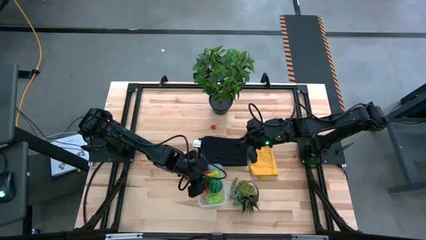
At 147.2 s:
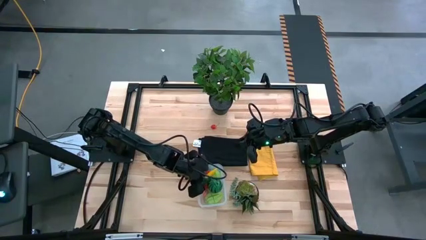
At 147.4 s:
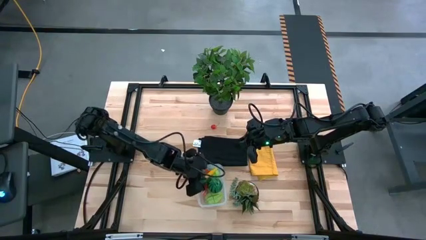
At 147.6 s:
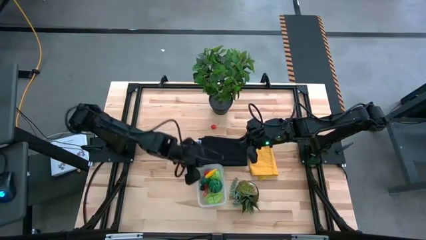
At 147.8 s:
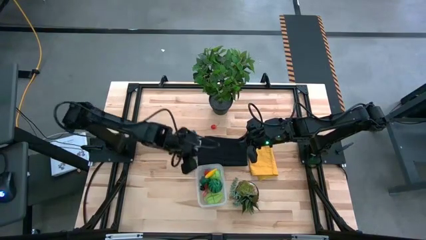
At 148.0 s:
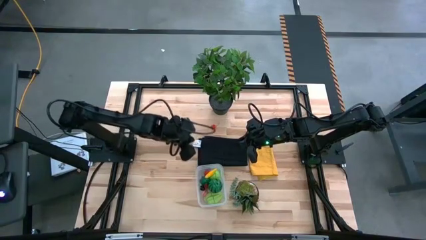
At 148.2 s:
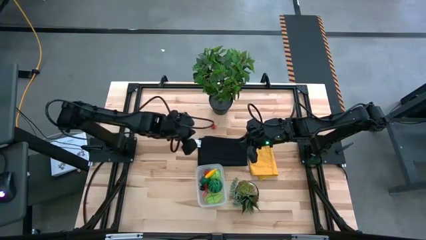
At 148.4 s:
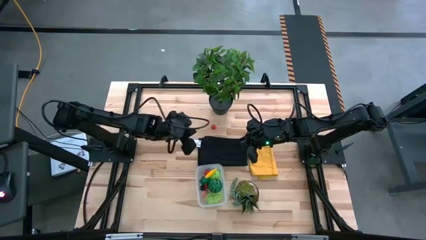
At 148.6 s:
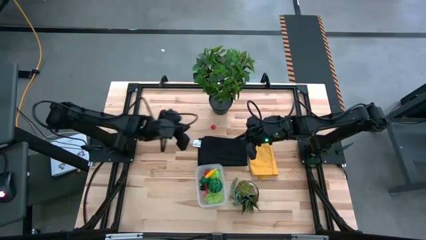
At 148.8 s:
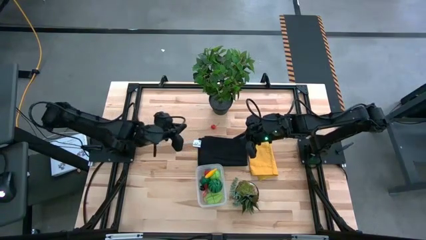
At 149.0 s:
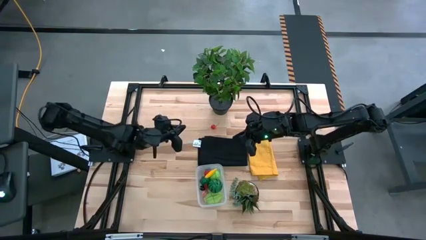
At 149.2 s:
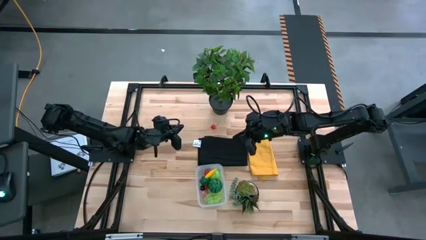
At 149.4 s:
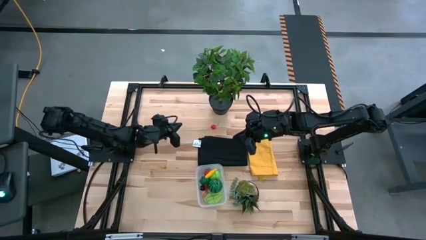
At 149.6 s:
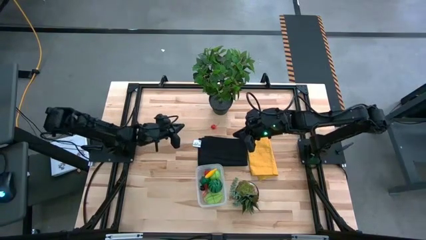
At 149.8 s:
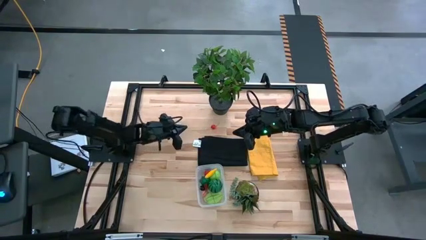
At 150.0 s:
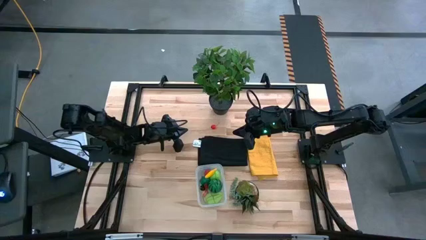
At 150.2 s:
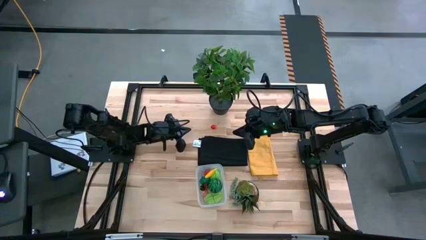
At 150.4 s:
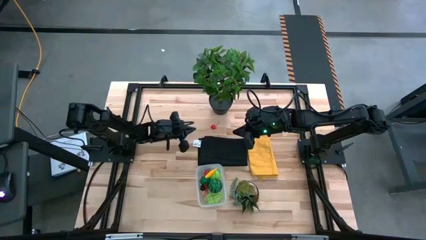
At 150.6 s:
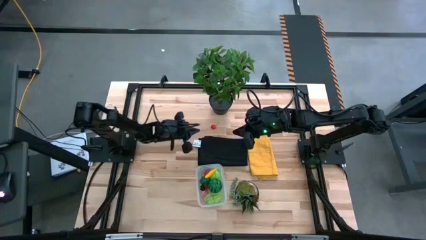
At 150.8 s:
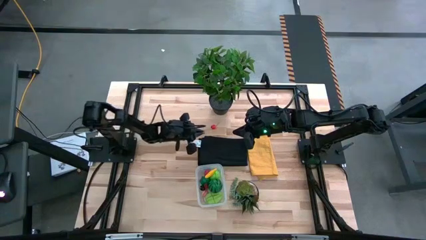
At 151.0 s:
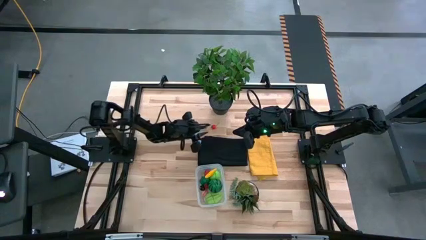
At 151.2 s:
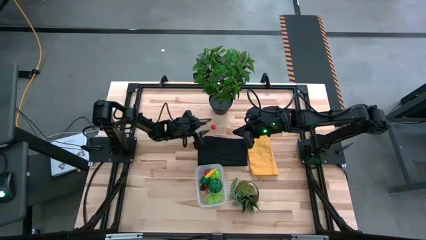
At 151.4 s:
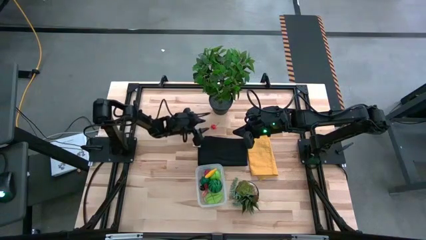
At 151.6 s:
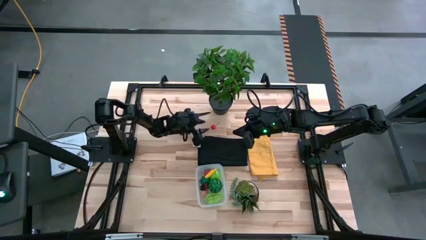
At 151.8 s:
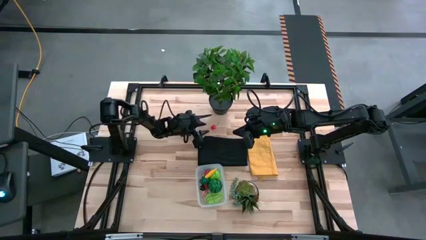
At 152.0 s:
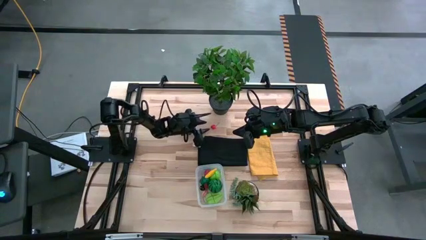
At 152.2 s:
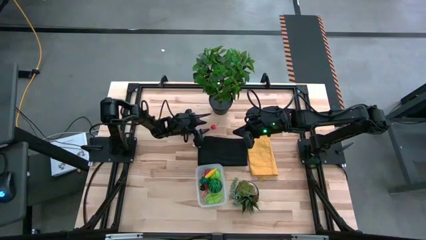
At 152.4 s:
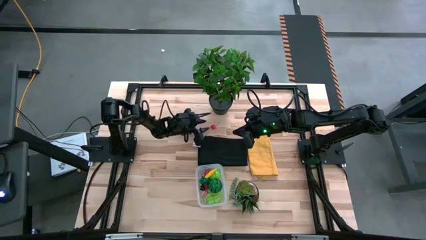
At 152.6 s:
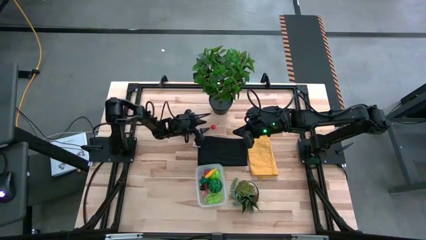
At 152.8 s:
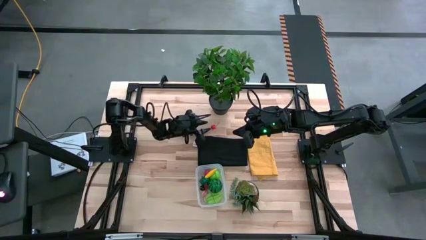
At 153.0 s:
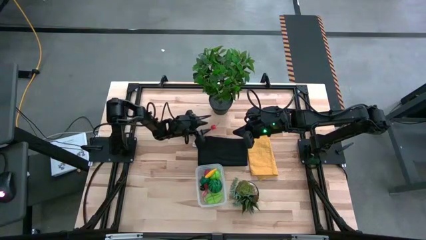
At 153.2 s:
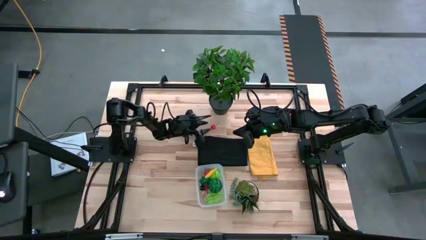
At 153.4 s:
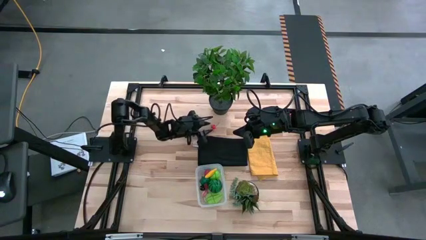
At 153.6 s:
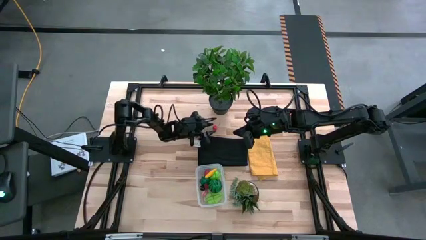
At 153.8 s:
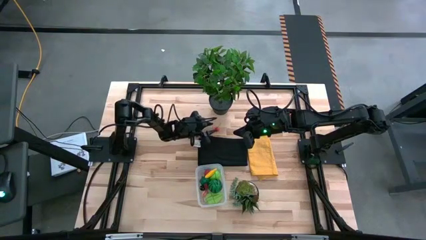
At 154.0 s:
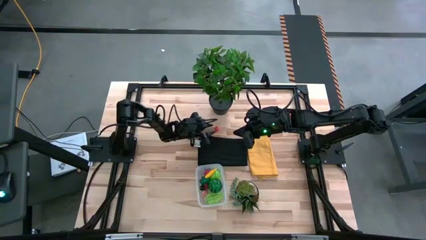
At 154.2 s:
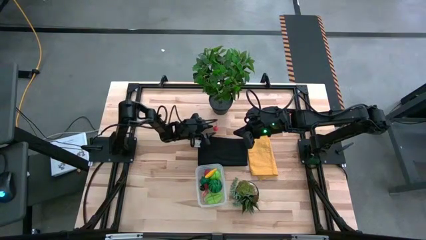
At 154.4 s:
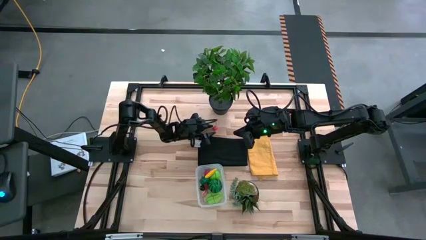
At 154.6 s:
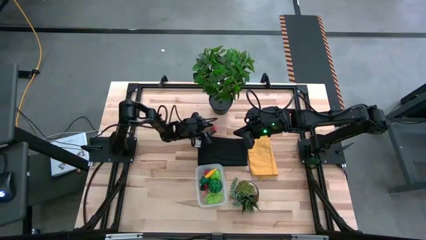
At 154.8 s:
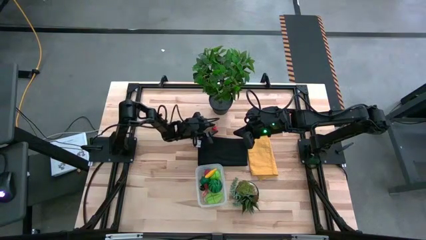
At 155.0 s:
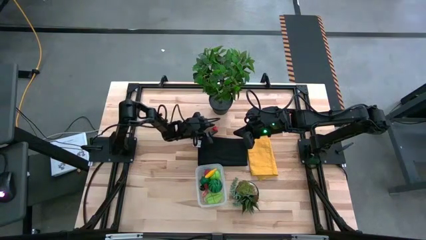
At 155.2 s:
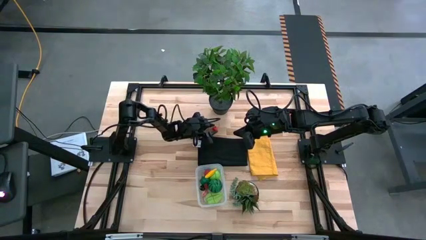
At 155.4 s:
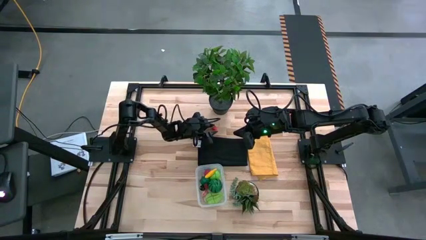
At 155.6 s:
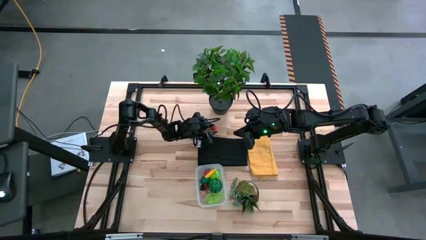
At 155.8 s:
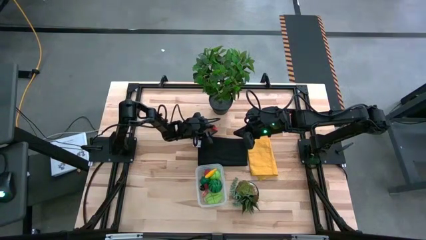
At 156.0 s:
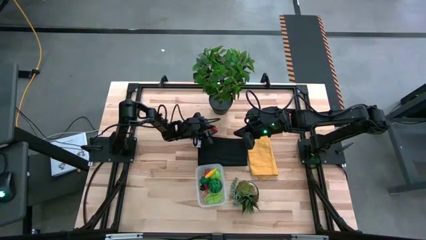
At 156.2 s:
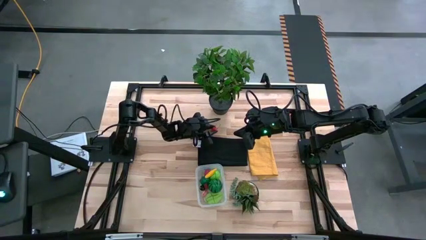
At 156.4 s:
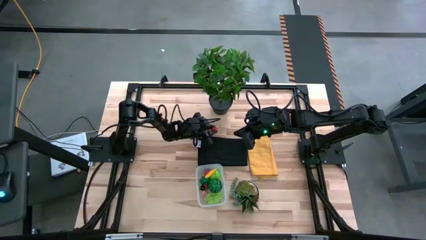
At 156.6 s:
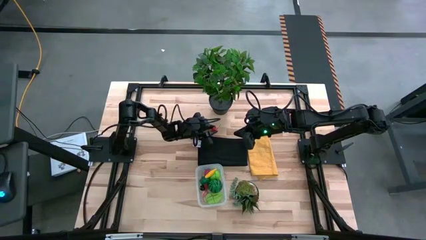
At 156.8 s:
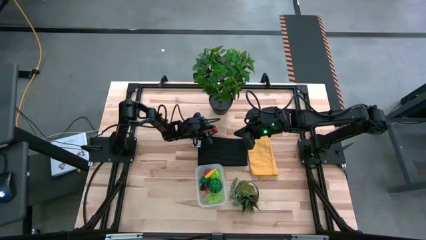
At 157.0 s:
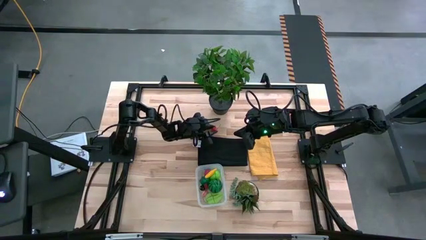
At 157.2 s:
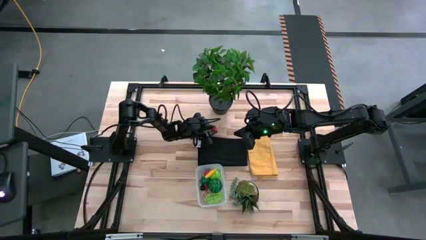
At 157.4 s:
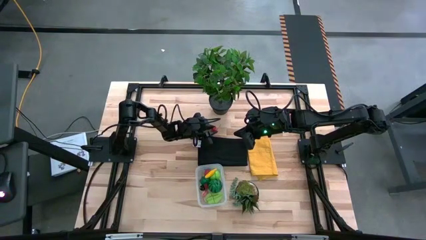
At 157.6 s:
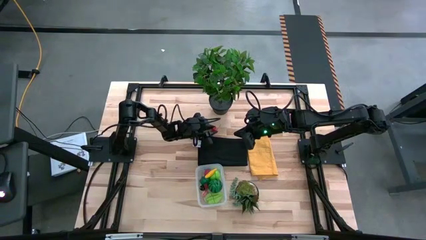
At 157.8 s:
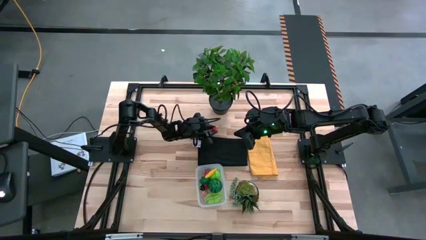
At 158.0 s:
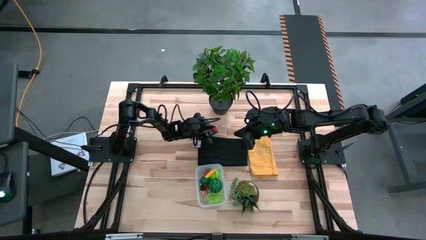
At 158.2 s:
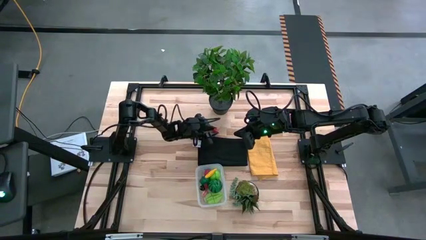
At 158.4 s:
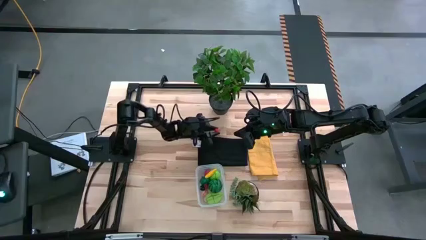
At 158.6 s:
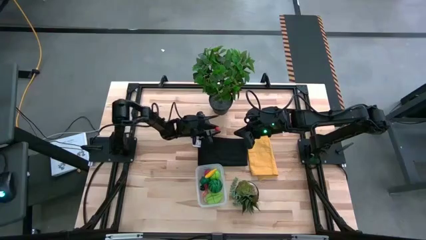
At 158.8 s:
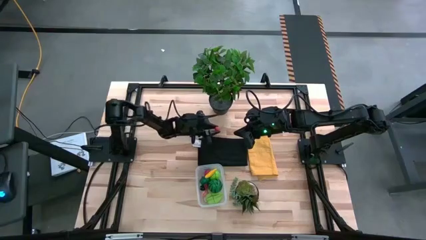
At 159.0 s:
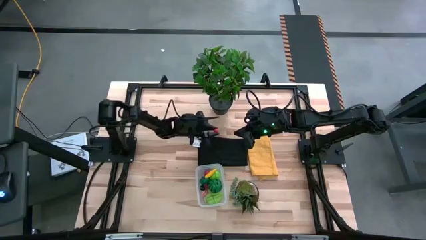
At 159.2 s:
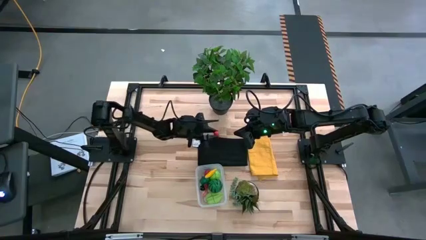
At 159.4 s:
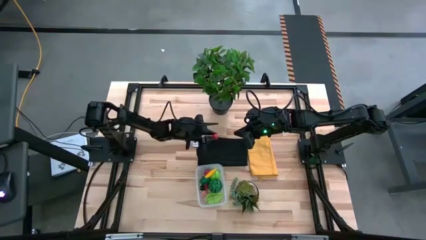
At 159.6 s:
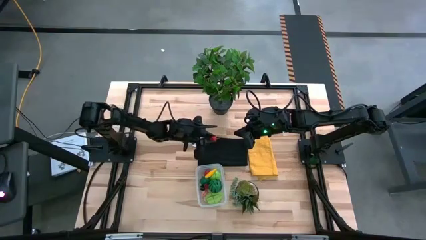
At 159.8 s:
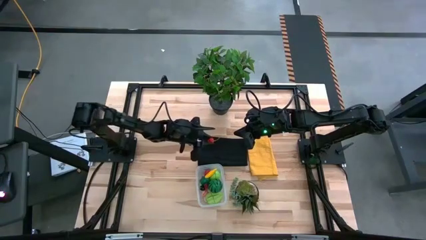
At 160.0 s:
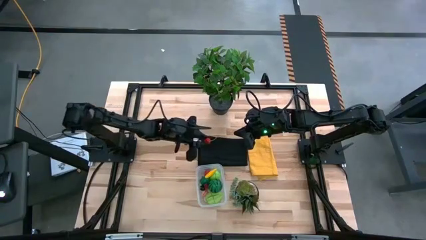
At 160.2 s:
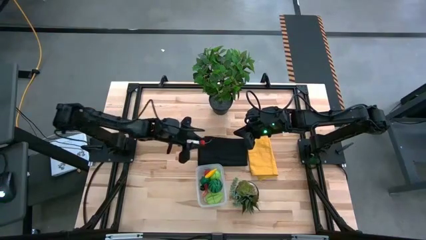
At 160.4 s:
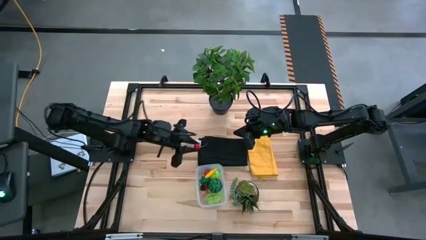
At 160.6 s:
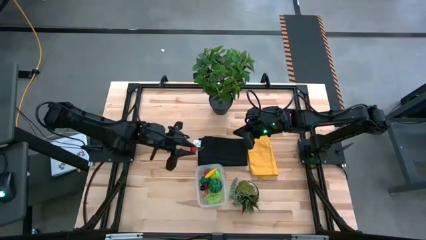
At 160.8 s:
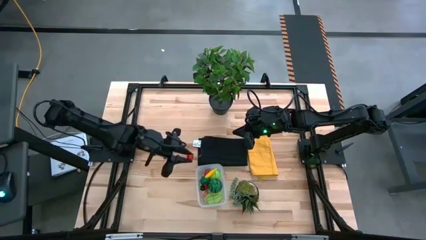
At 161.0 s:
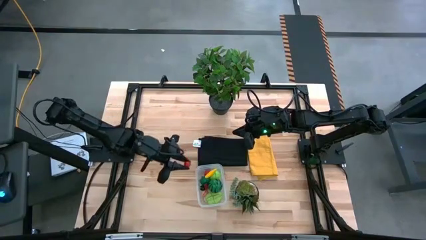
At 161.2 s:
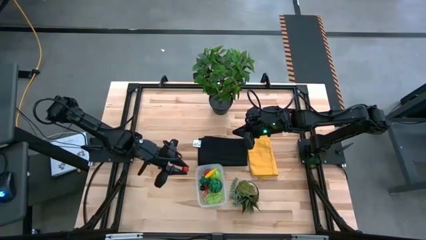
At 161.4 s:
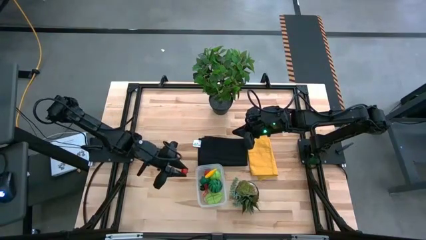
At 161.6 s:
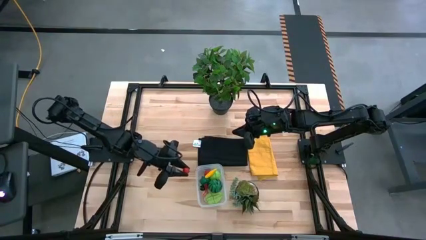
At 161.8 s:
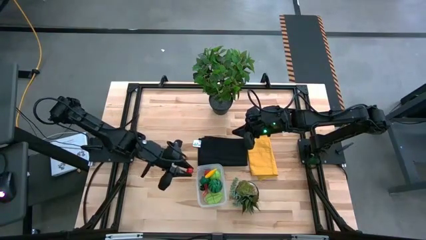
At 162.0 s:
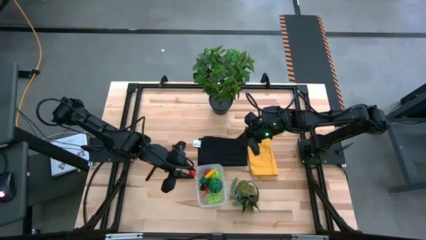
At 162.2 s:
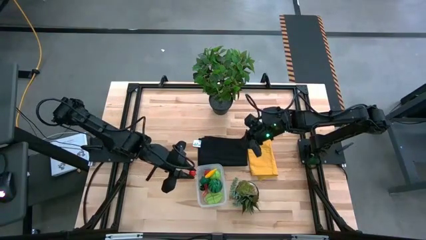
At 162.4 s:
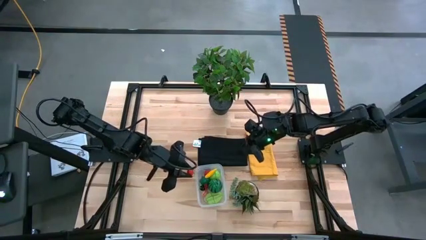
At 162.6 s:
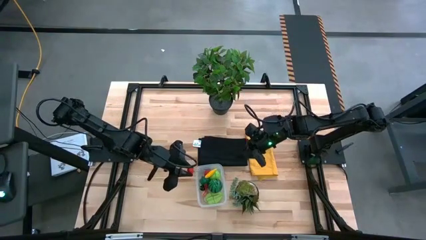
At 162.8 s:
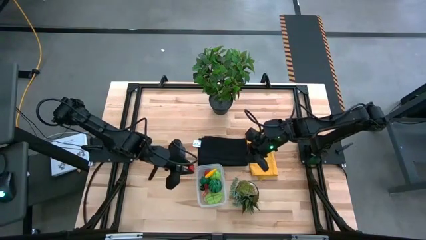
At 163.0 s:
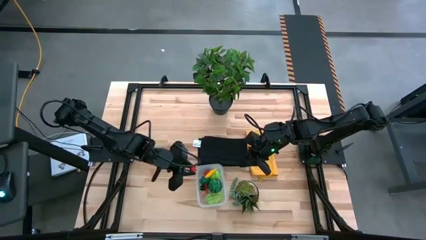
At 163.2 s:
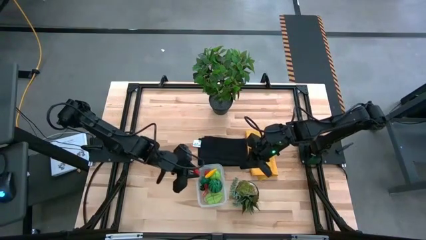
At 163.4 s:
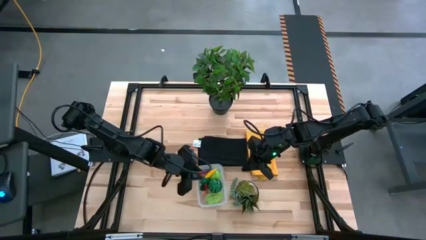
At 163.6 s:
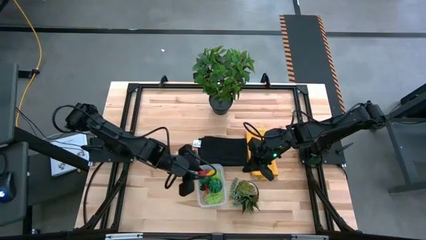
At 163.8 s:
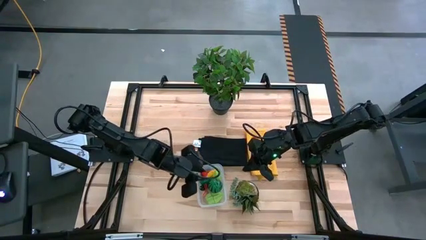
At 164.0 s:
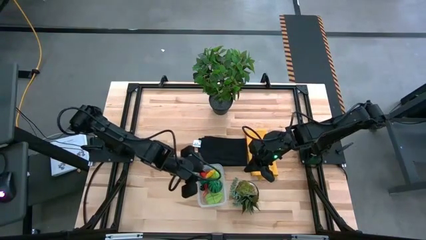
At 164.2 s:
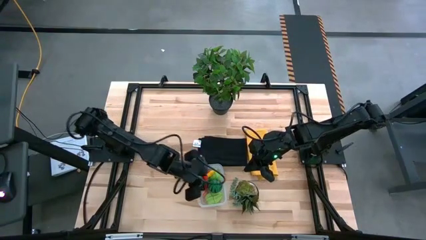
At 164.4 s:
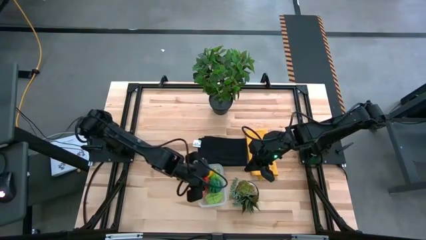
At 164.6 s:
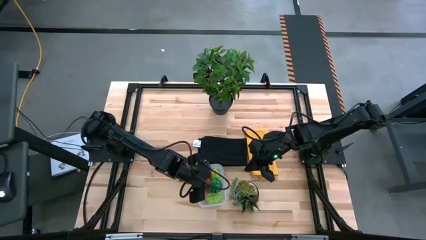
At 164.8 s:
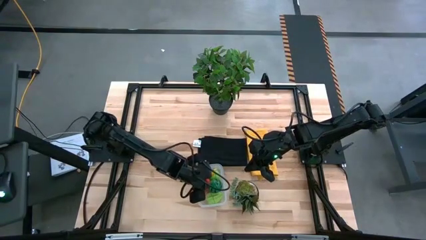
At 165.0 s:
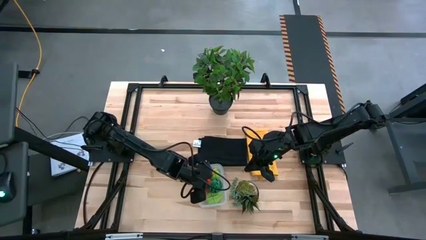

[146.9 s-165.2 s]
Task: Pick and placing Produce into tupperware
Put the cherry into the bin
